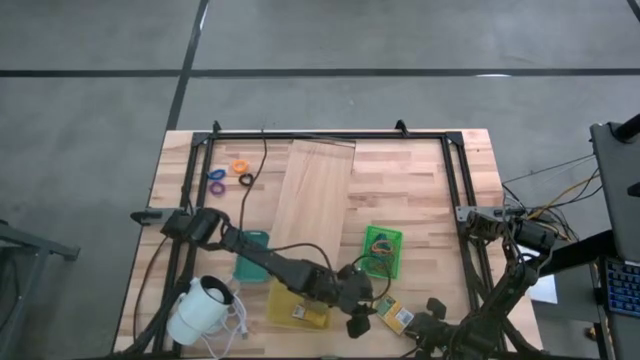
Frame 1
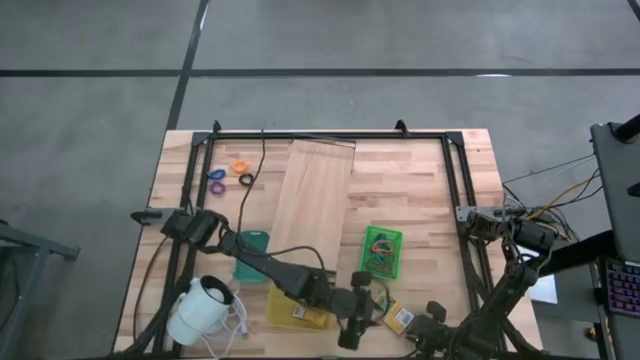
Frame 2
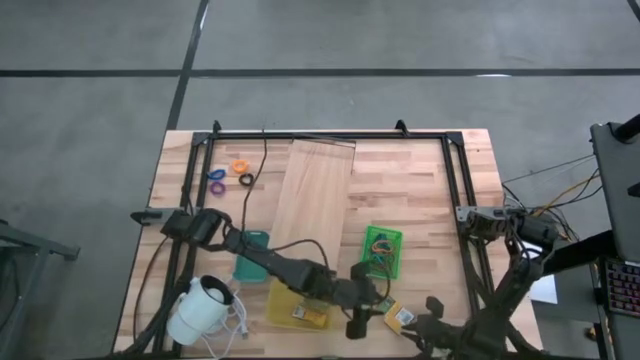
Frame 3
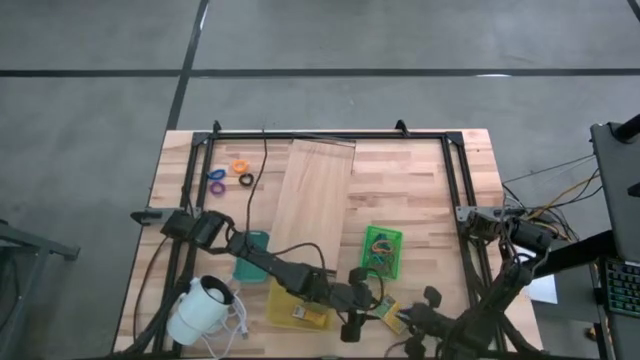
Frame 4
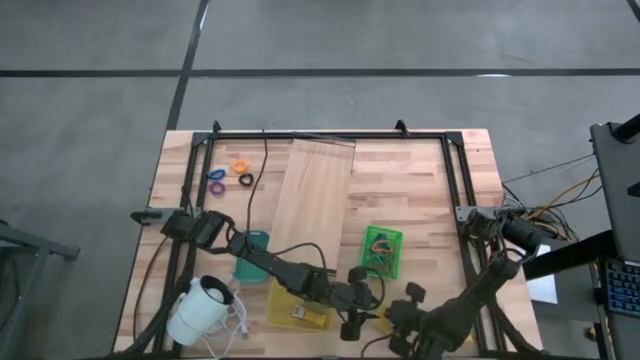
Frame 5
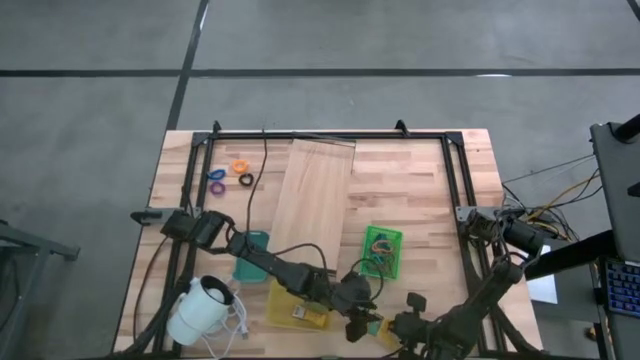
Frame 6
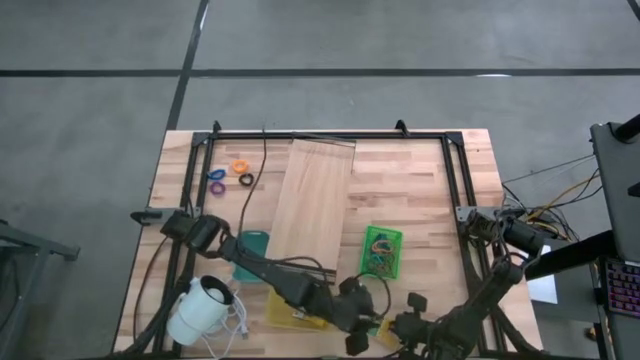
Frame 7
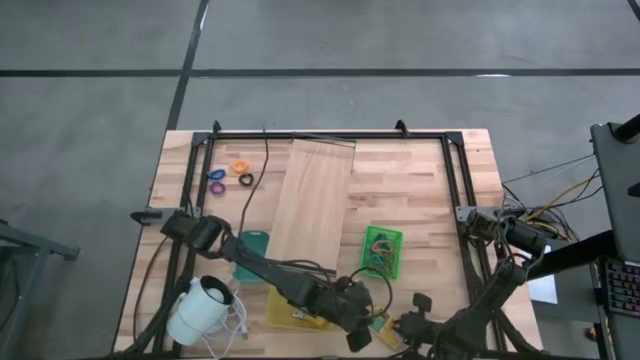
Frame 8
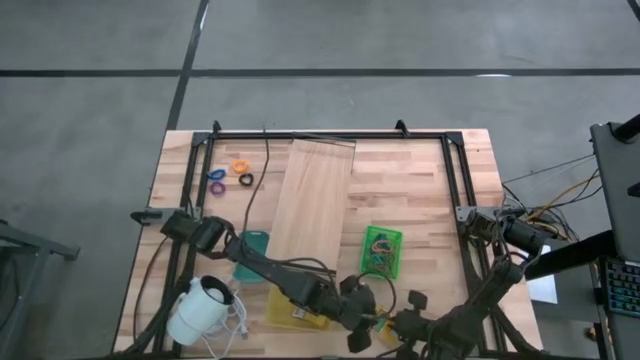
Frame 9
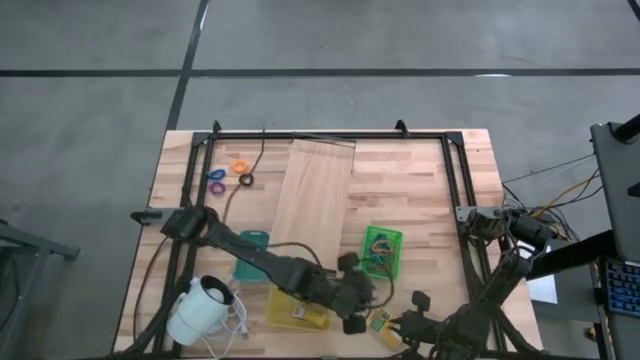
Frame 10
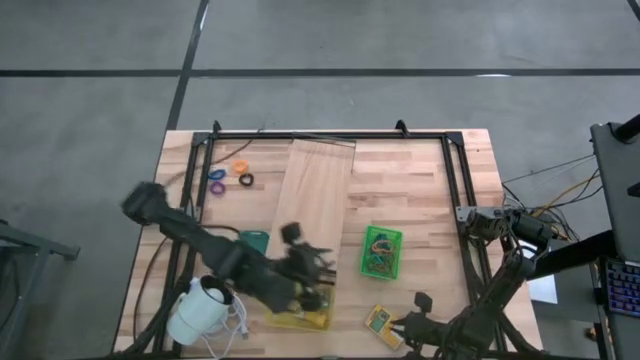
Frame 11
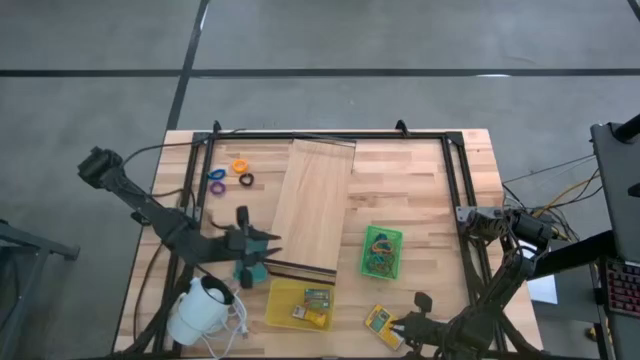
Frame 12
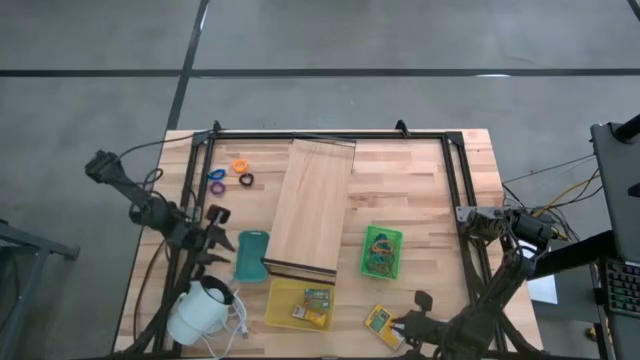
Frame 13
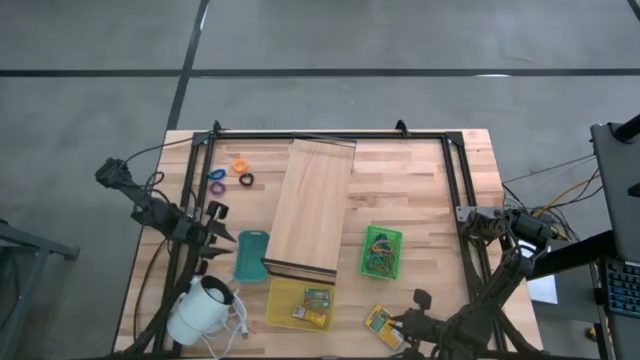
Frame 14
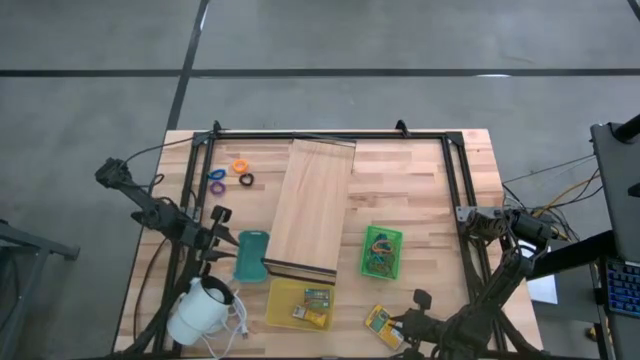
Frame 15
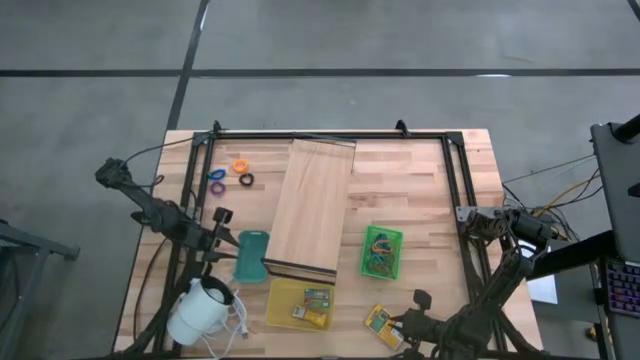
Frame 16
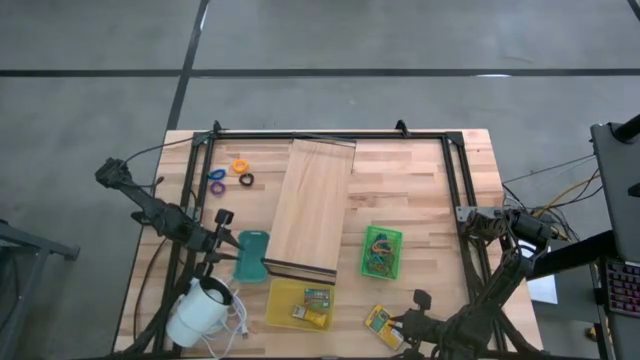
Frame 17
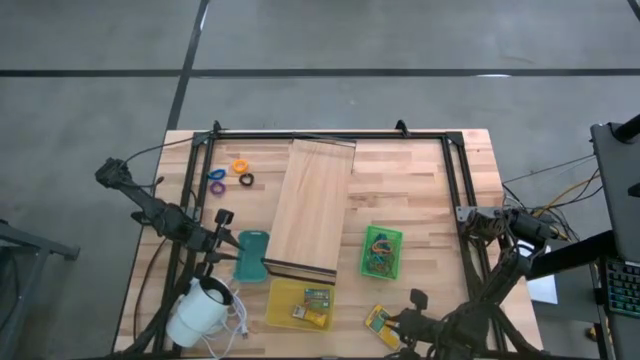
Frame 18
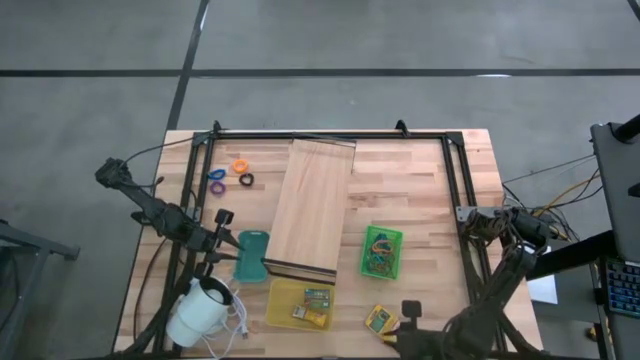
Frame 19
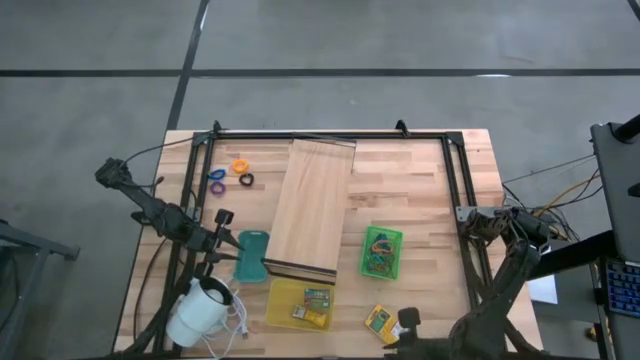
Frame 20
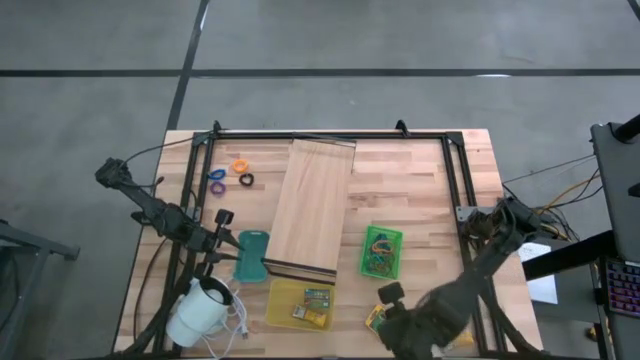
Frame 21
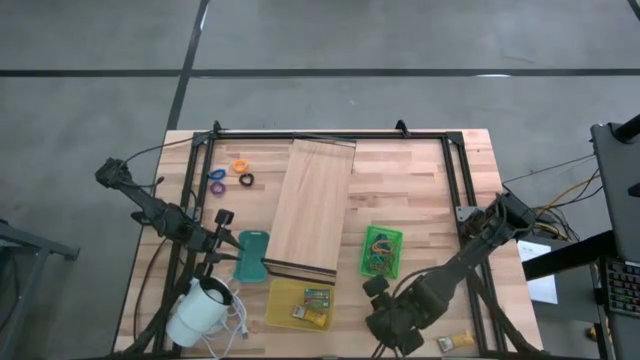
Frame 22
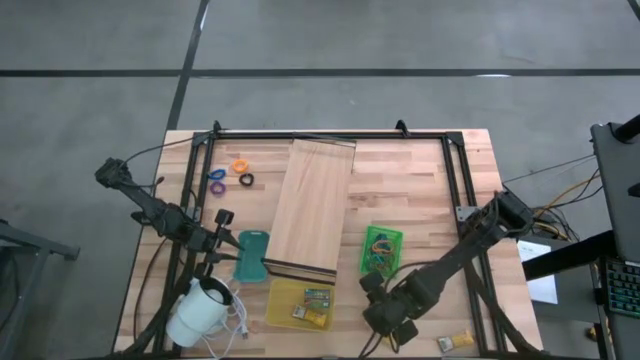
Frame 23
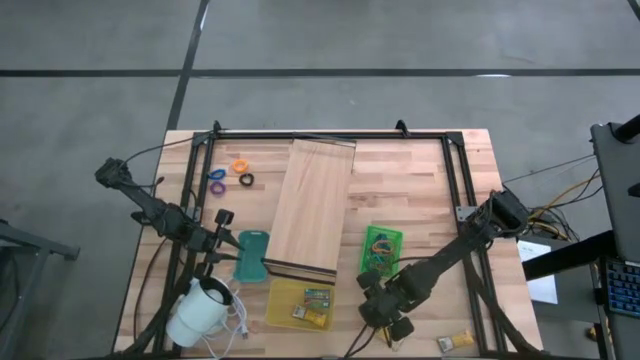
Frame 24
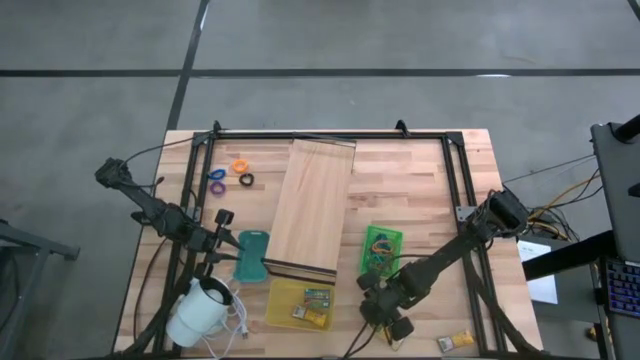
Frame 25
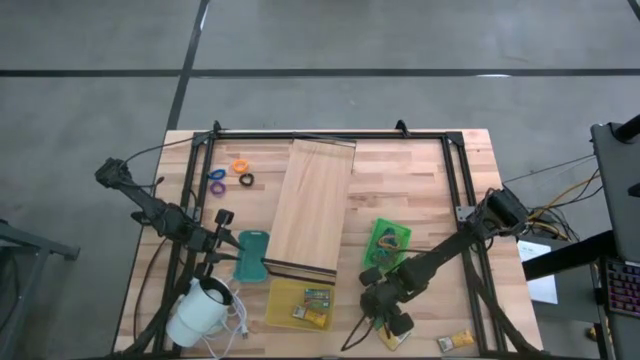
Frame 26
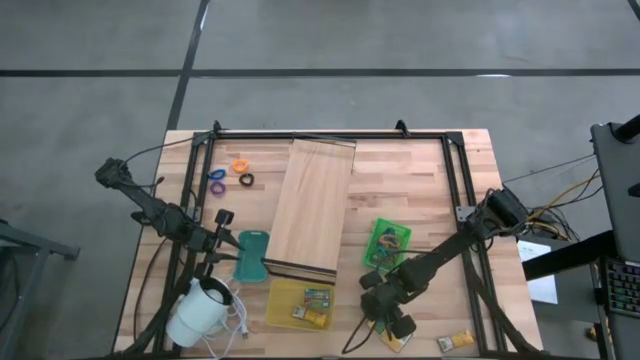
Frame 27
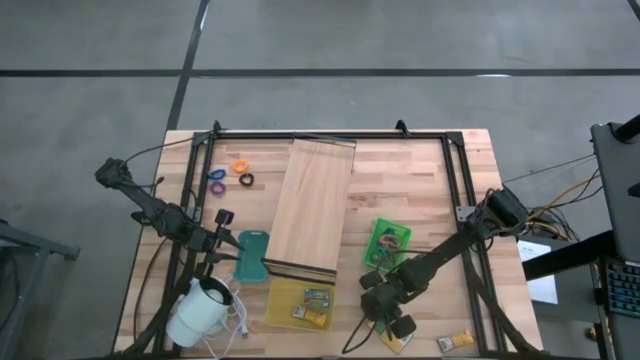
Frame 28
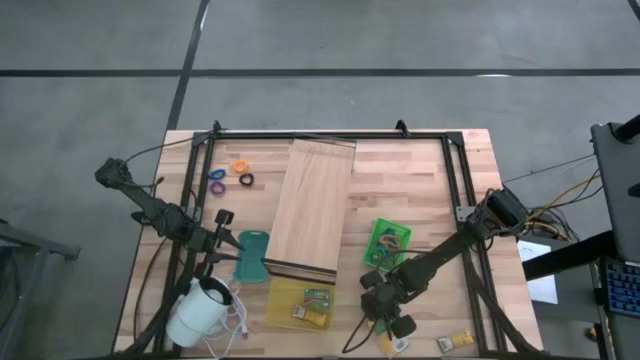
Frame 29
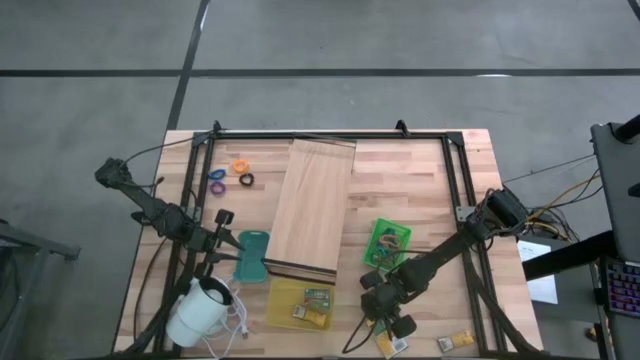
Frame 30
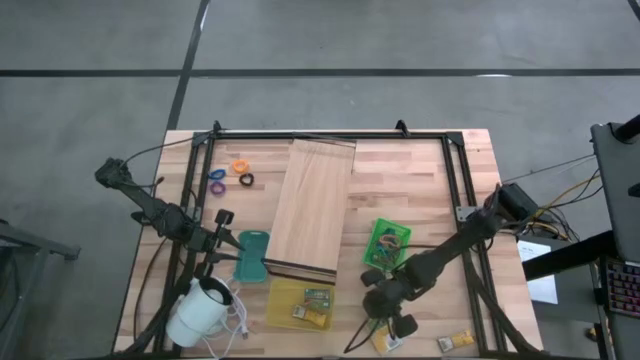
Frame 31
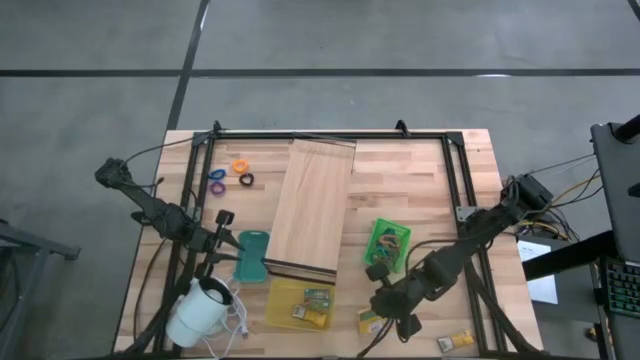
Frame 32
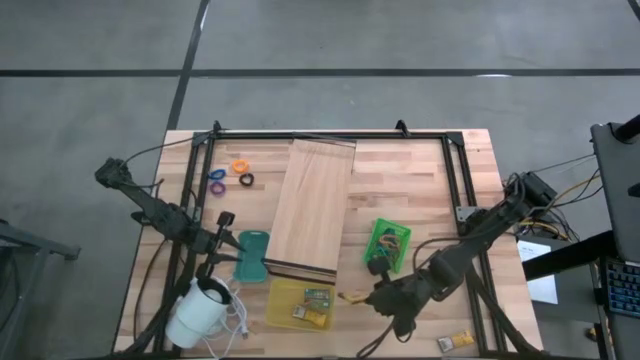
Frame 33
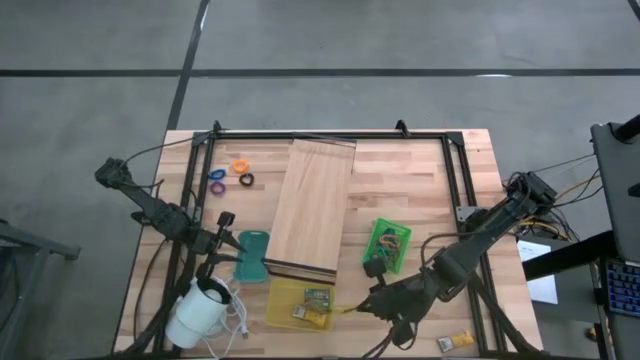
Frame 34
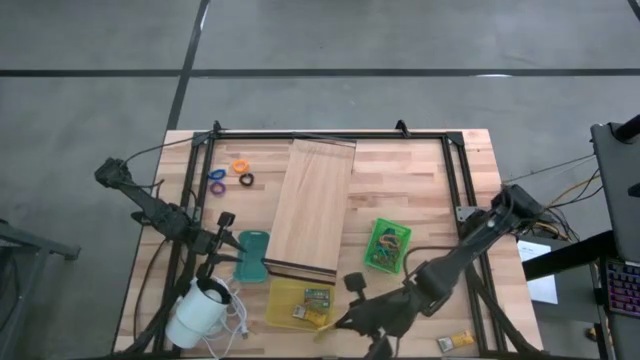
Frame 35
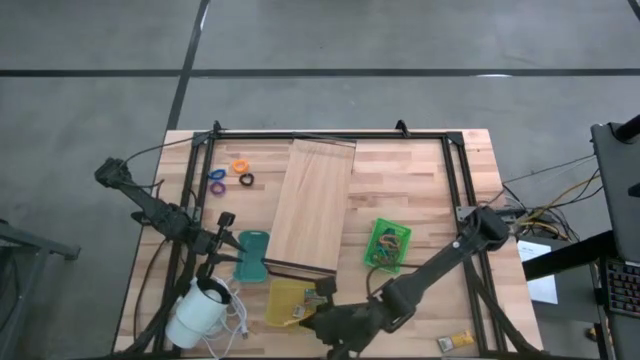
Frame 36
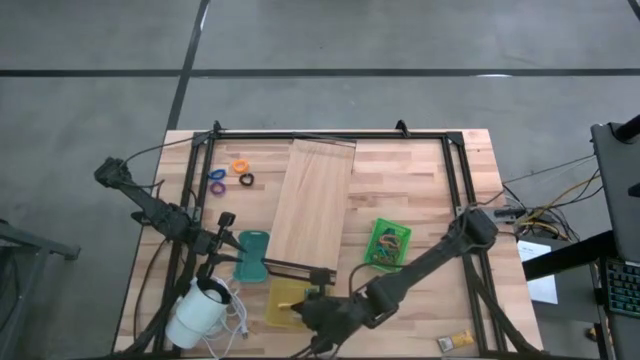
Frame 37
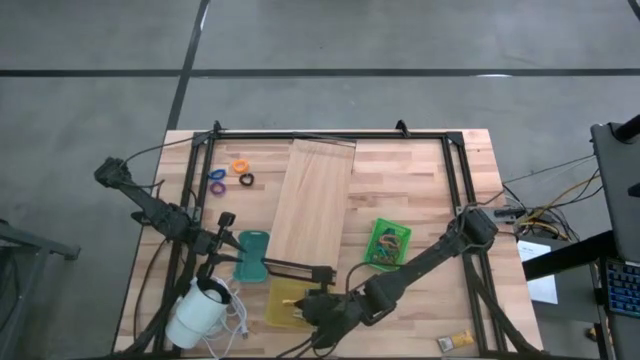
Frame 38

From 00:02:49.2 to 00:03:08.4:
Task: Pick & Place Office Desk Supplies
Put the large yellow crayon box into the yellow bin
